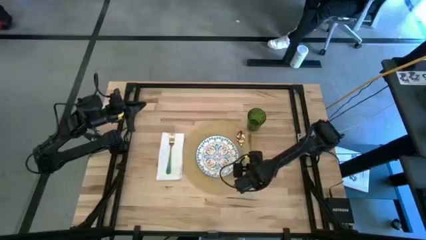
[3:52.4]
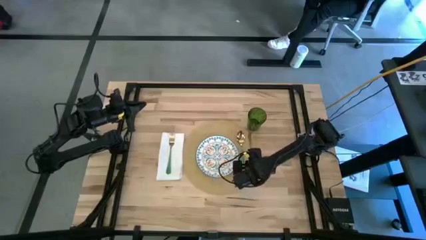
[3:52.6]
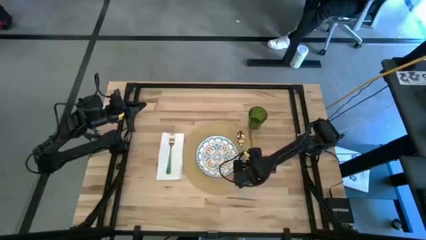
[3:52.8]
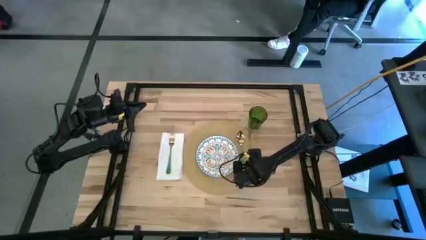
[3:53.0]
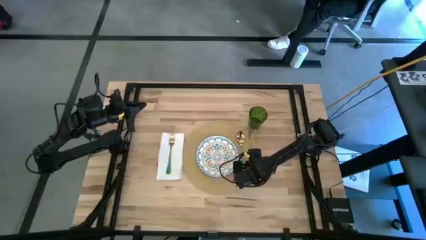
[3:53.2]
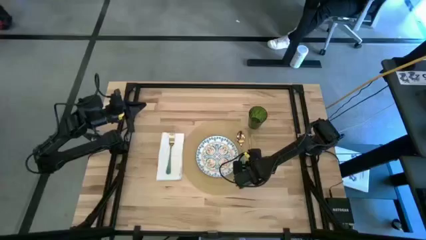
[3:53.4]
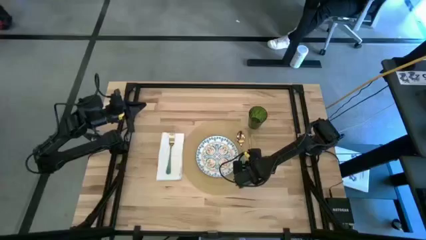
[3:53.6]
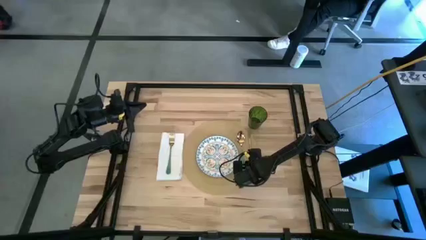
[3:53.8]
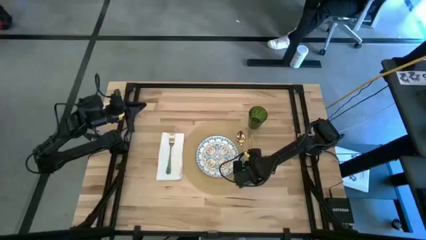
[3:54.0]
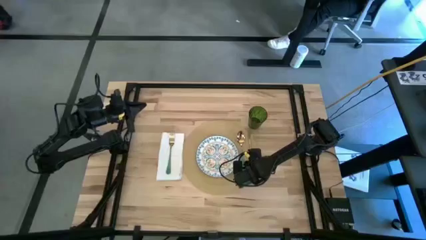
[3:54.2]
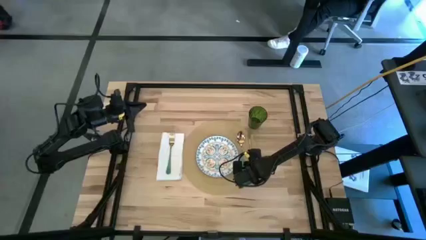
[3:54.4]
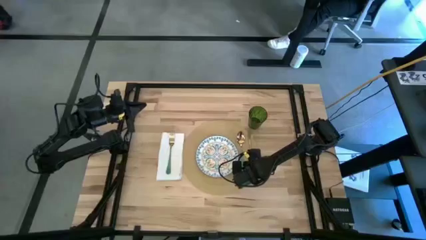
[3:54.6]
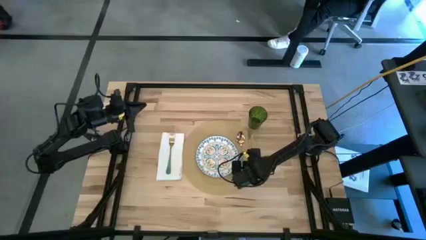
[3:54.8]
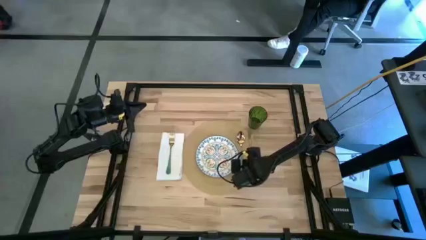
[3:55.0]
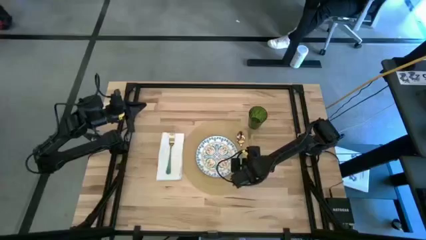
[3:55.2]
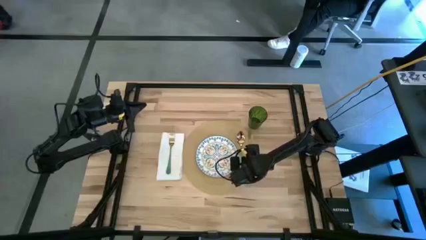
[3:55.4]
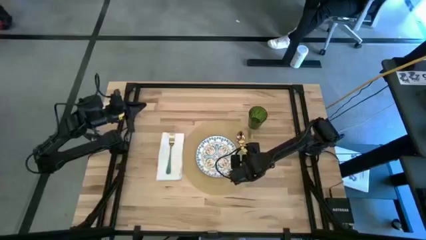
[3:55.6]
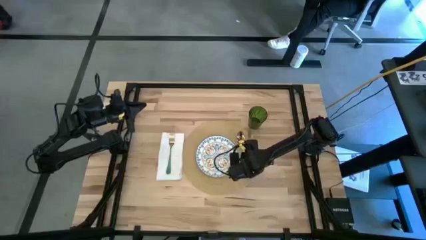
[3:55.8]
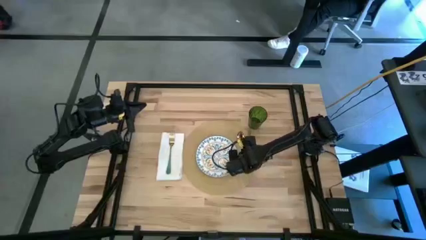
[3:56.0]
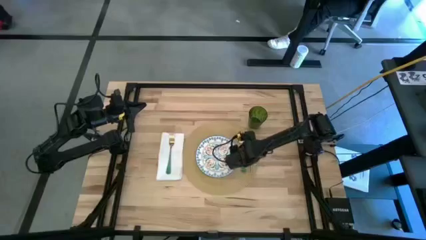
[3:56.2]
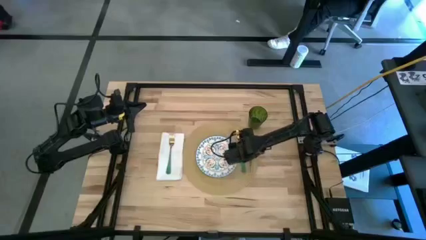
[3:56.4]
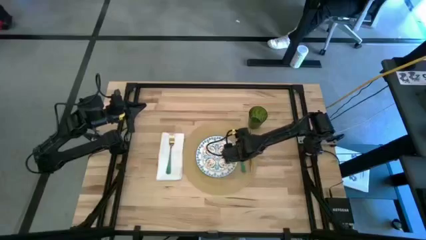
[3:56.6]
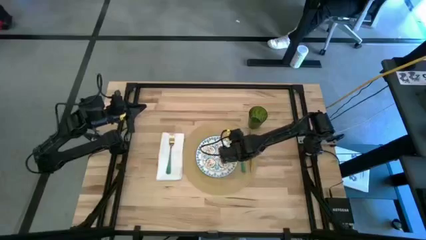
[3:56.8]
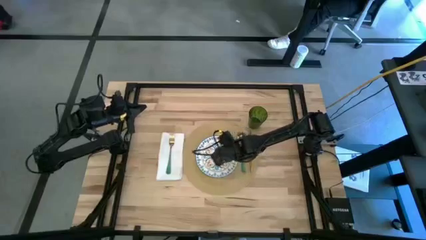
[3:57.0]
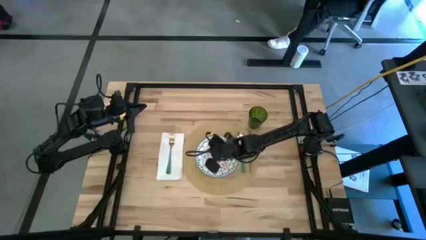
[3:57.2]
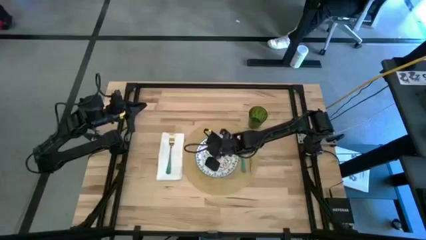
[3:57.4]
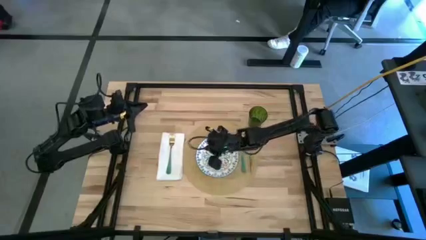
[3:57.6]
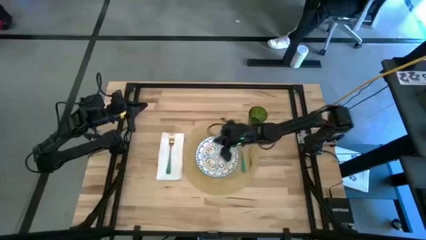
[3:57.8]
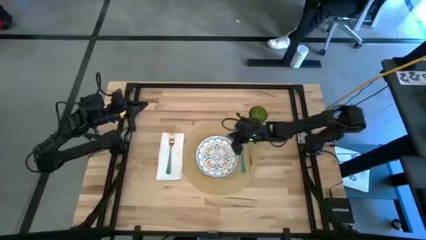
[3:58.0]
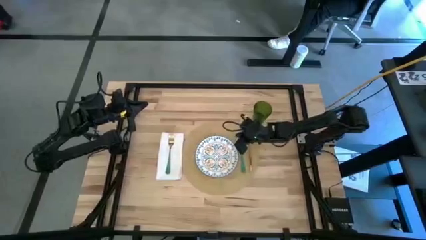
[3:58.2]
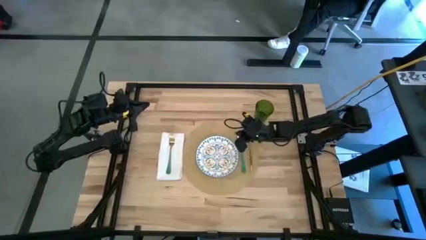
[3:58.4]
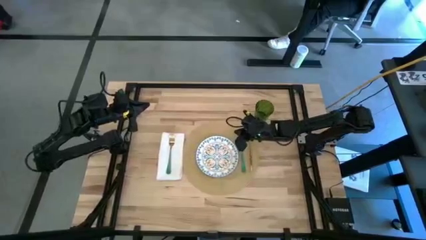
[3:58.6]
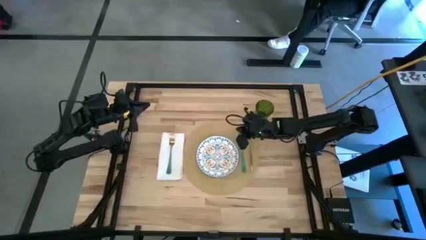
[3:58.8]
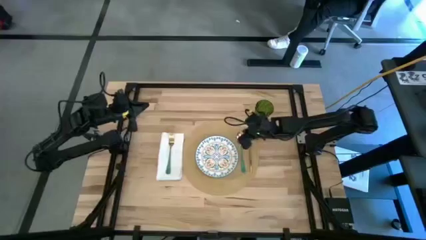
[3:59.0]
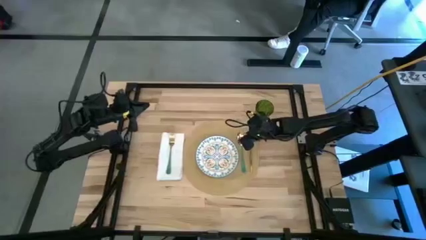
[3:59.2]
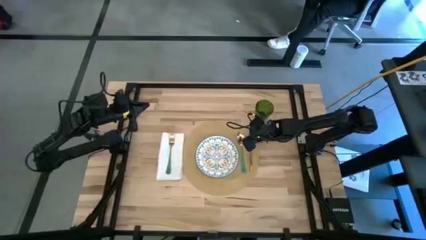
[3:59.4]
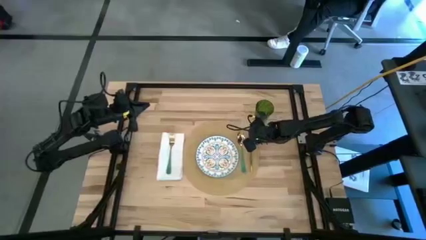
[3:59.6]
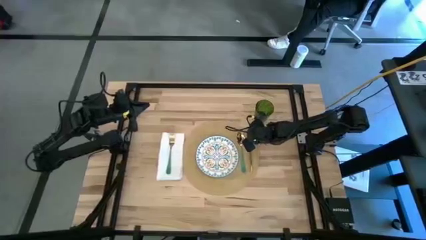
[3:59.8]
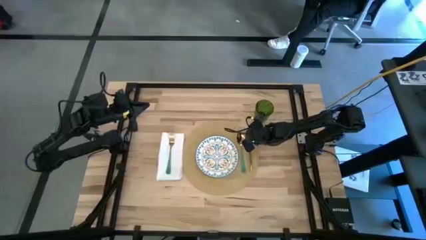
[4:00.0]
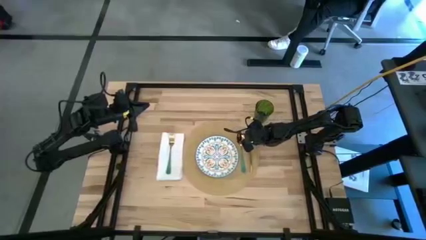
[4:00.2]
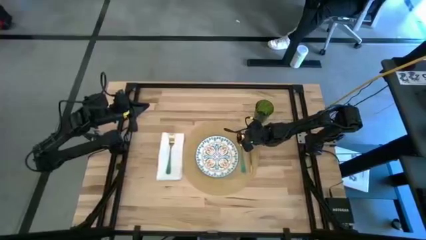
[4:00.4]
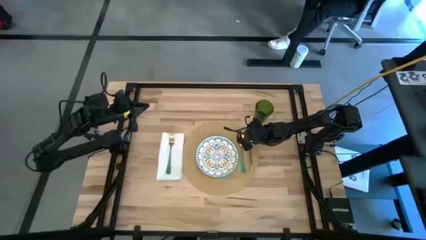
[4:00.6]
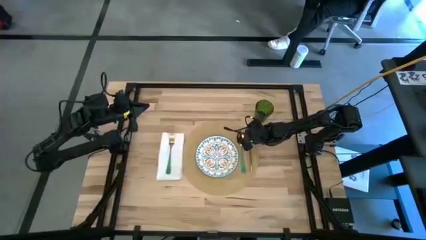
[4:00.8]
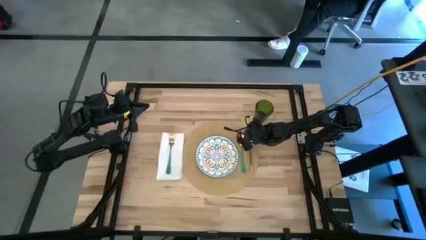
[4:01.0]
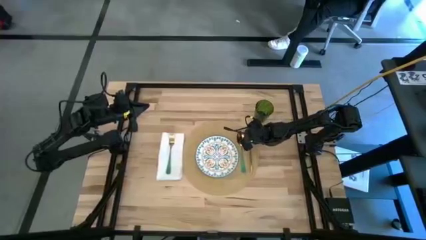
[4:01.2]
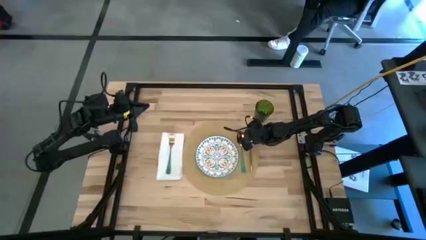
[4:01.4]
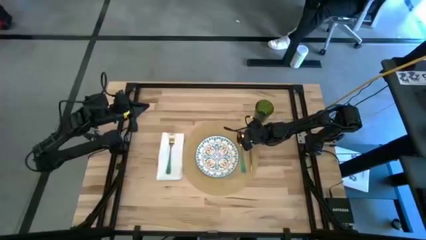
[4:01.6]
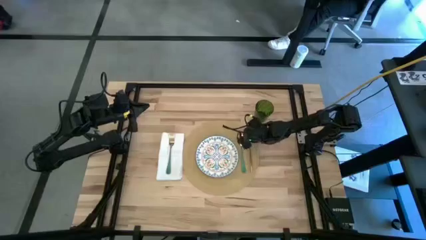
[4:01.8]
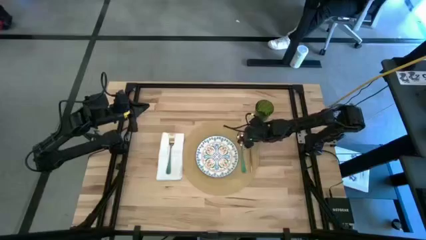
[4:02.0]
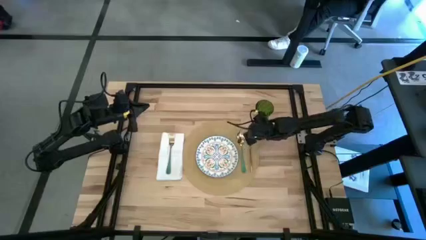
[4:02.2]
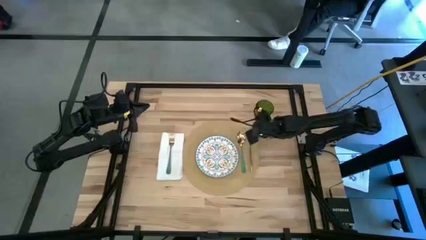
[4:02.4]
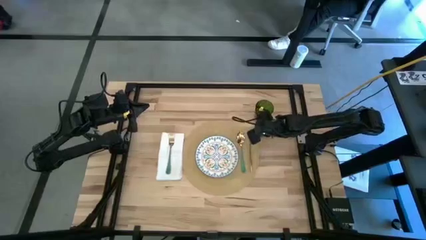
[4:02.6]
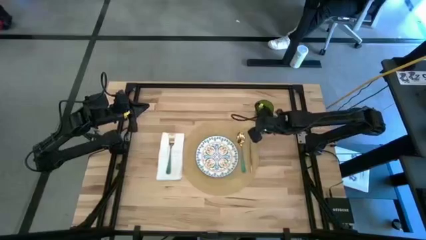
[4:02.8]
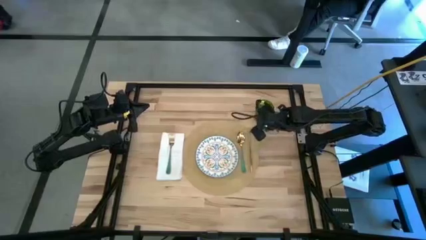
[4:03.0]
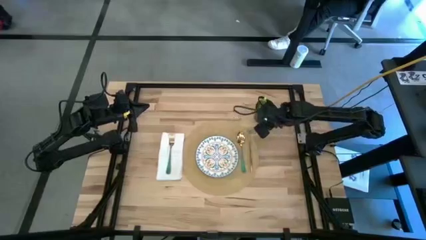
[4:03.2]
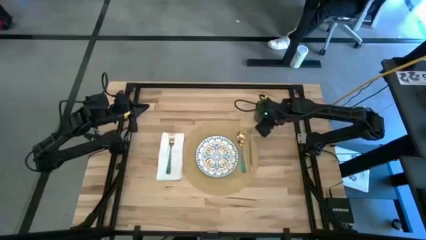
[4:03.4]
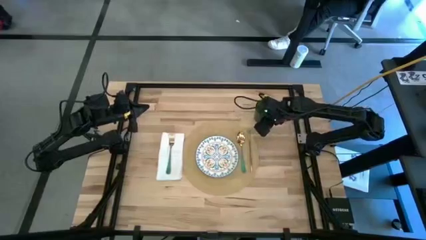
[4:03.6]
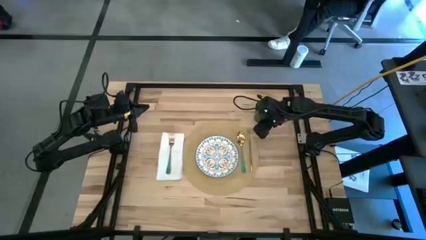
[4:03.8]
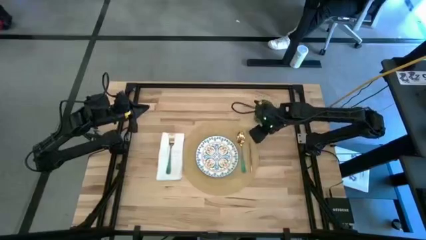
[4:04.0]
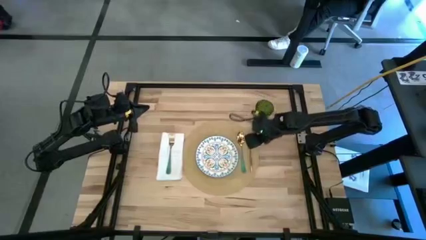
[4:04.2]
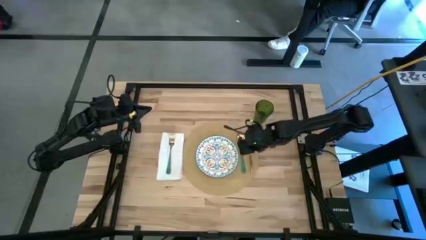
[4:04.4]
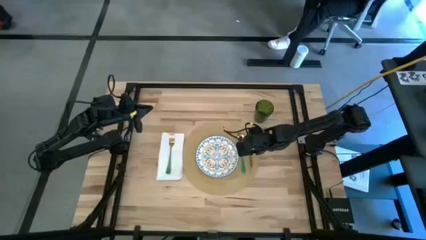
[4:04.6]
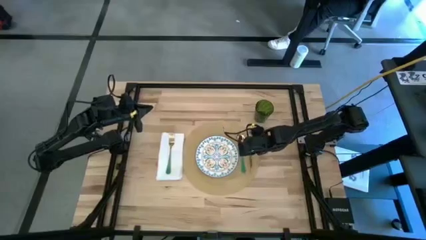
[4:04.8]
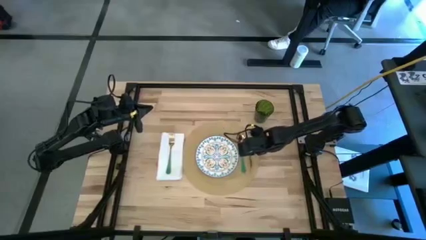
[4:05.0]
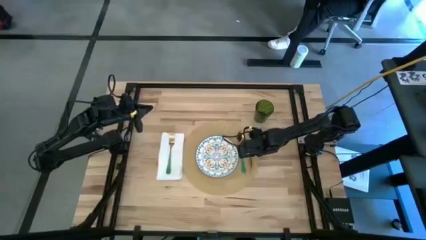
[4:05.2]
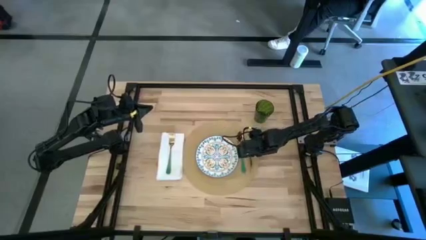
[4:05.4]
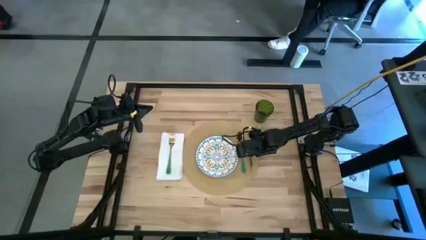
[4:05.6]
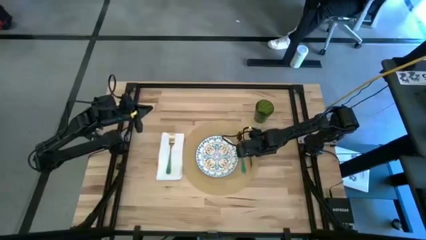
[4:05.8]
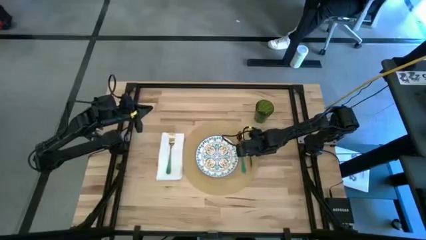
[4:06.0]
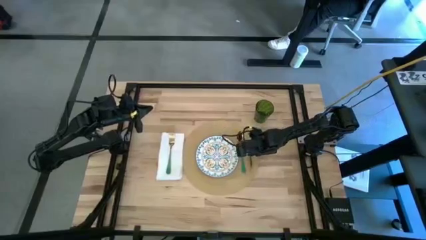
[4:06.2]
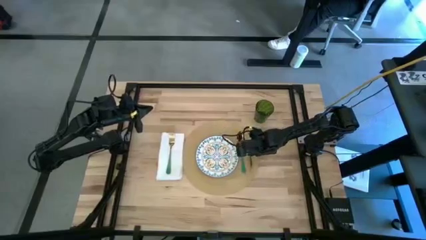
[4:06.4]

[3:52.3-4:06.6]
Task: Set table place
Put the gold table knife to the right of the green spoon on the brown place mat
